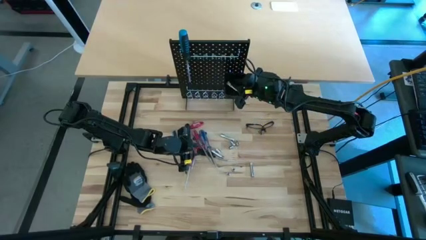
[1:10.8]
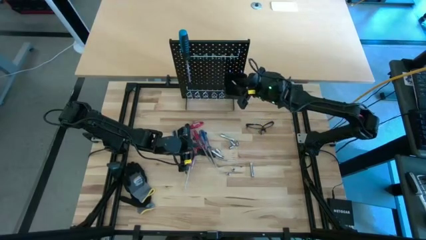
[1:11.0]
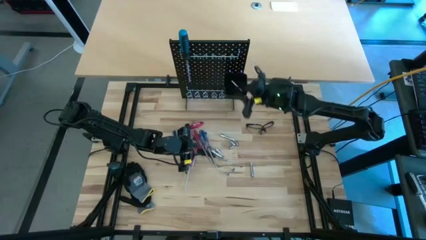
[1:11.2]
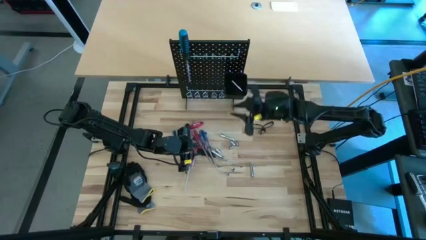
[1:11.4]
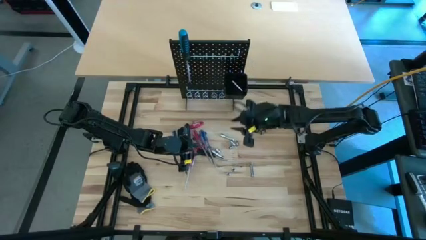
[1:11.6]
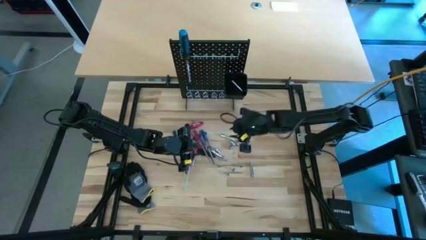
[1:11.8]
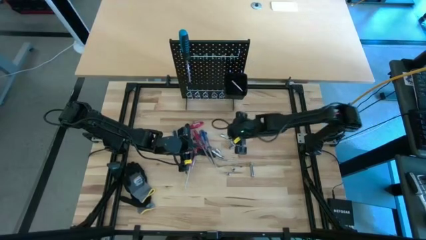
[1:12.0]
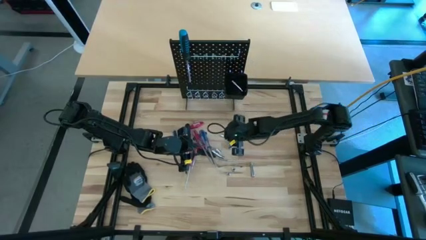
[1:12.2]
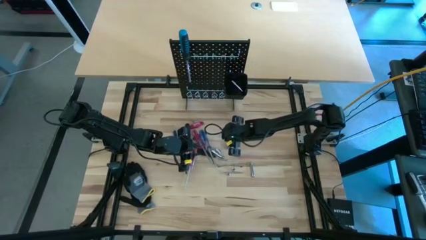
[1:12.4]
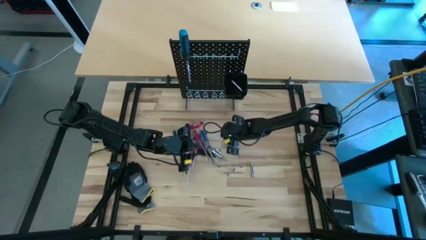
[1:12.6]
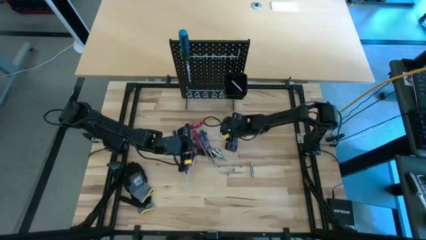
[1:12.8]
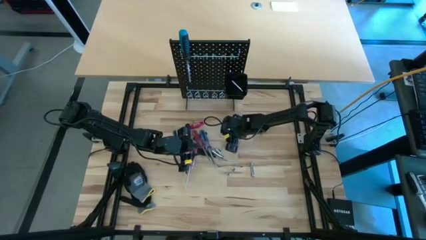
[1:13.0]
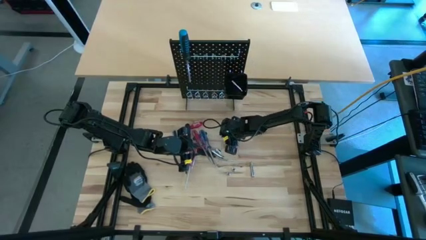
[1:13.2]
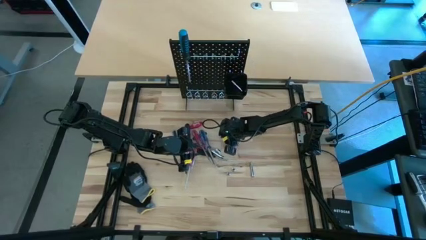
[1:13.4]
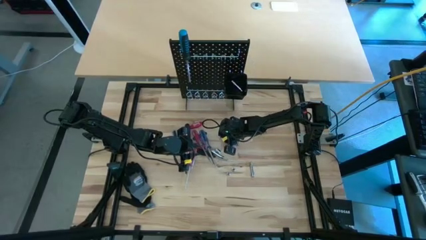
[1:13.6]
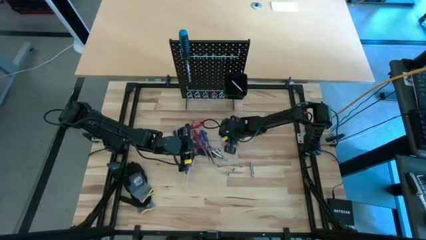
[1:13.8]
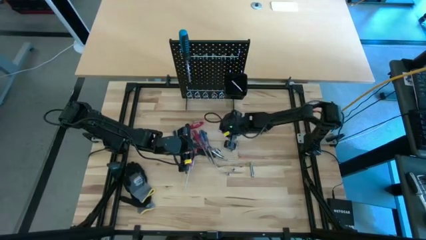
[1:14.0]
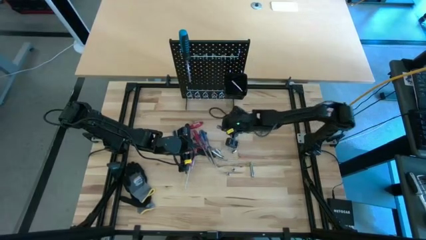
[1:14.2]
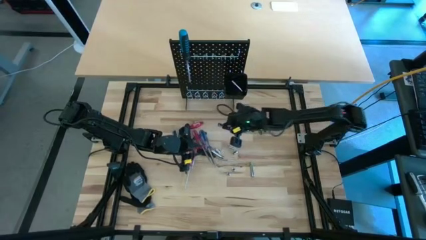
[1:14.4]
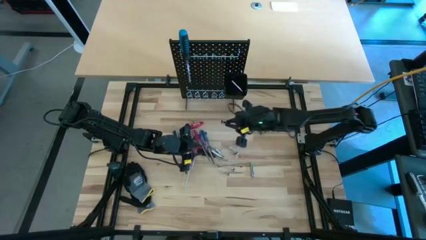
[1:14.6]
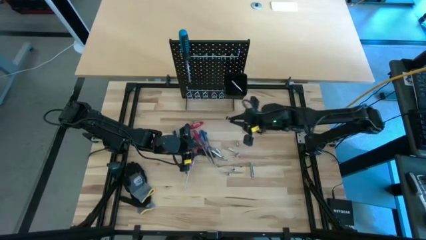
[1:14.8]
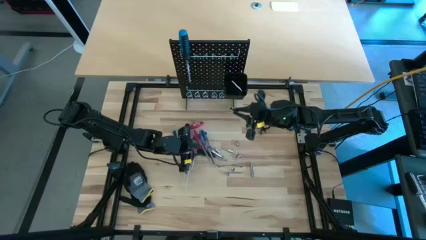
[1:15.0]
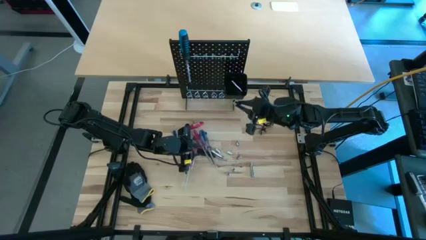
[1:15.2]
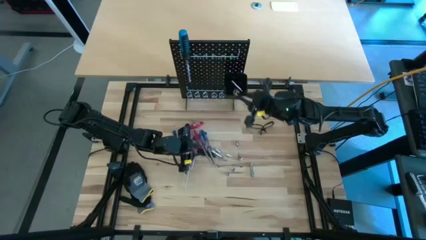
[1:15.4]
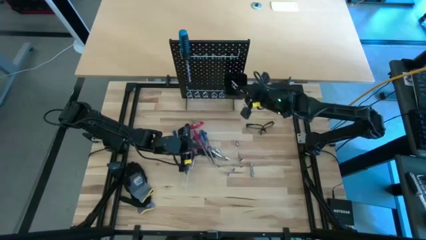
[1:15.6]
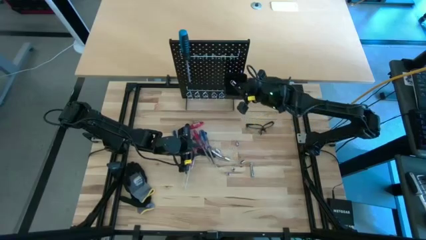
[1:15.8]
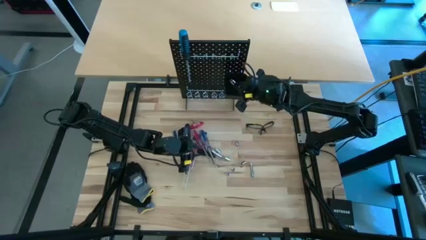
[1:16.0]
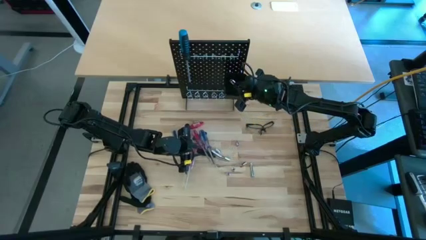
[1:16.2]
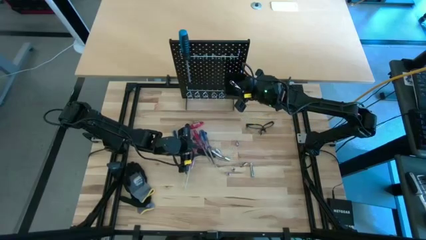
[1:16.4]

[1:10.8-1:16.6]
Task: Hang tools onto peg board
Put the silver extension bar into the black bin on the peg board

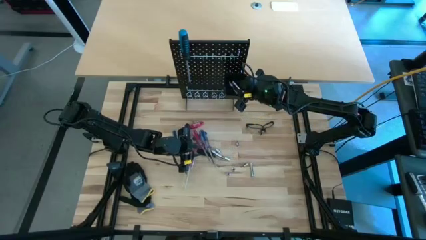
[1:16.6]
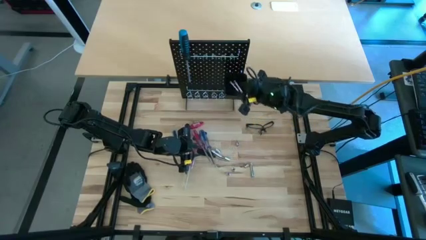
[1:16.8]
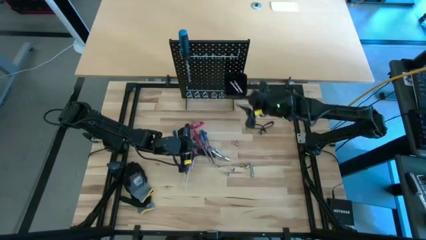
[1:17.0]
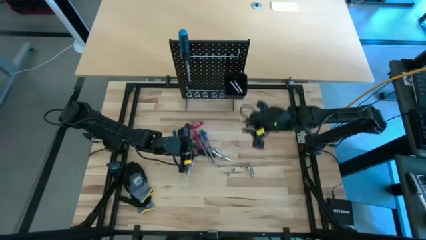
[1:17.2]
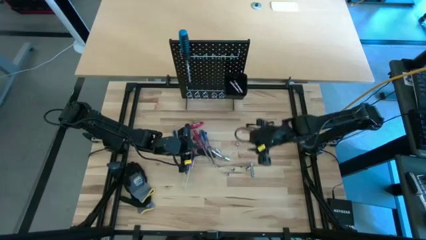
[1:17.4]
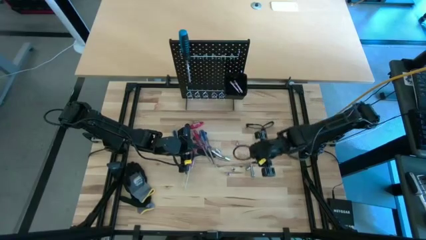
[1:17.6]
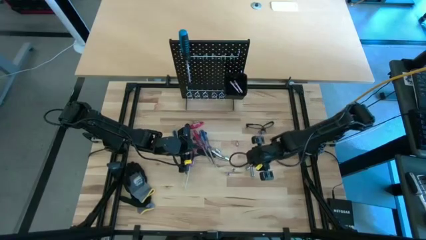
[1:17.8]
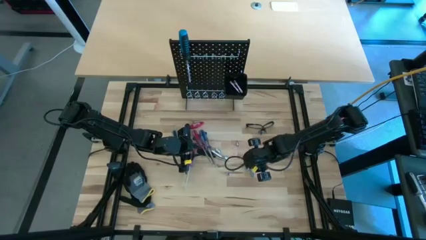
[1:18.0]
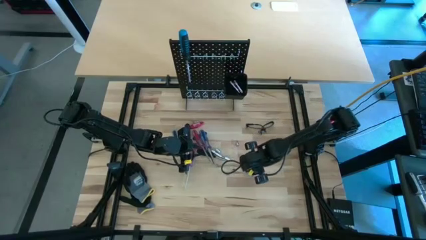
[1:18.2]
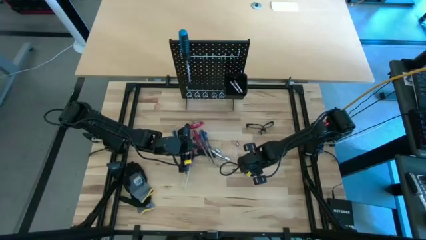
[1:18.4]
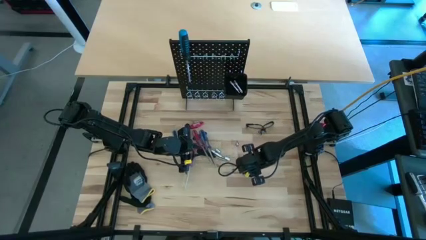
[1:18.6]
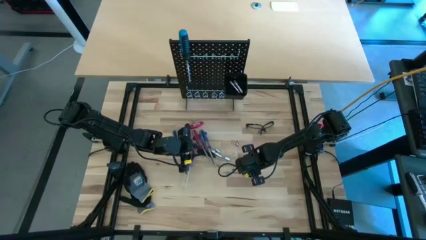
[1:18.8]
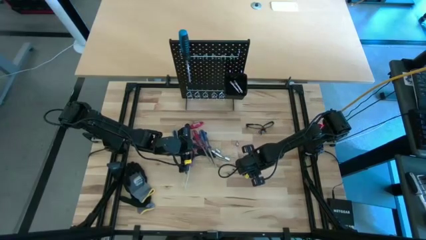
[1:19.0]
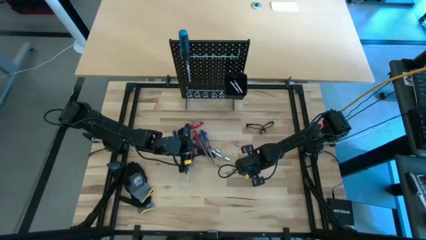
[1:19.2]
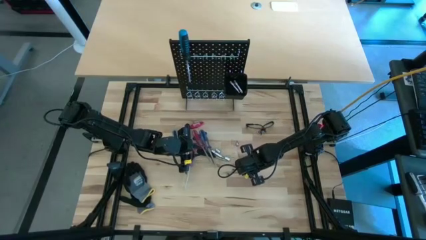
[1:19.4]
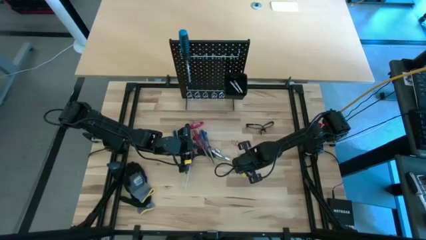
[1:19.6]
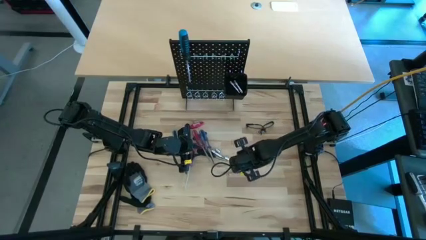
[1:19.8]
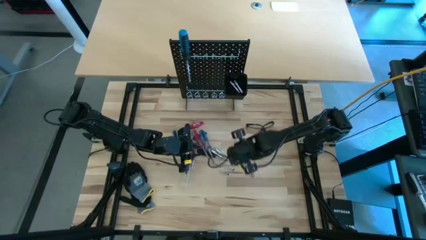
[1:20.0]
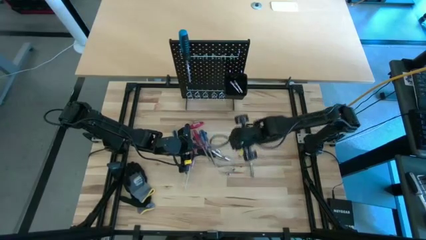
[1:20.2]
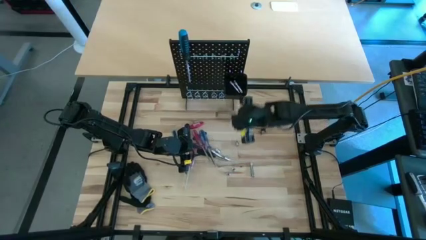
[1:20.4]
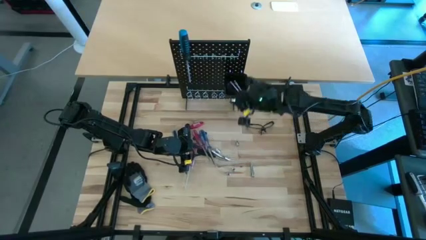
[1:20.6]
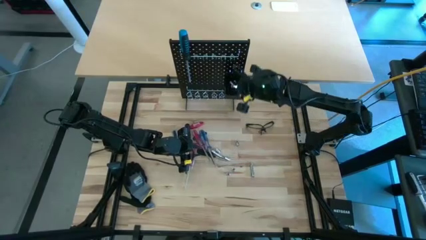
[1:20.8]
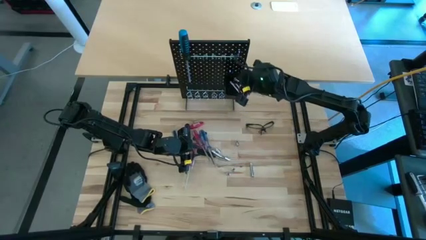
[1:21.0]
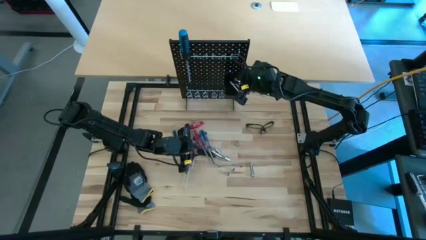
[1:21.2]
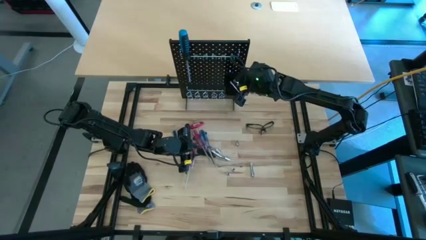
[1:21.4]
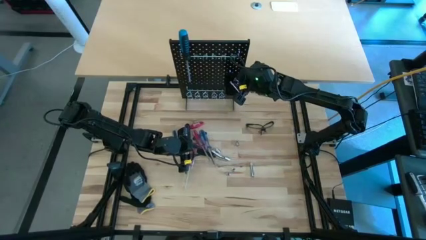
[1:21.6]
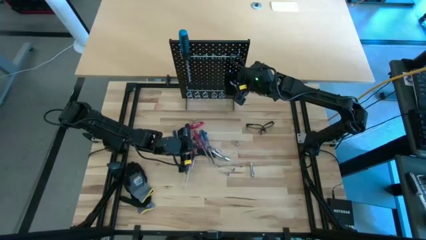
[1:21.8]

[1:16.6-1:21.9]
Put the silver socket into the black bin on the peg board

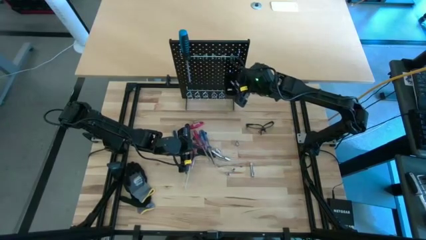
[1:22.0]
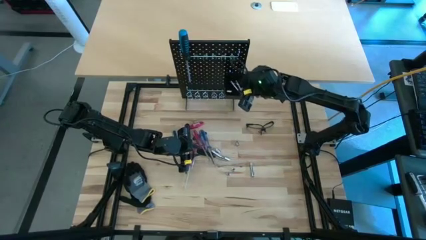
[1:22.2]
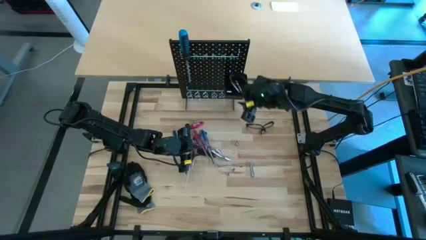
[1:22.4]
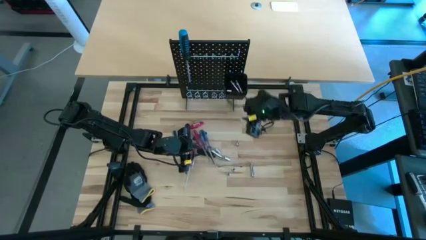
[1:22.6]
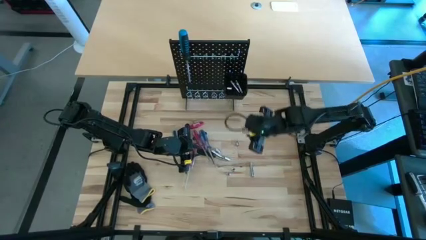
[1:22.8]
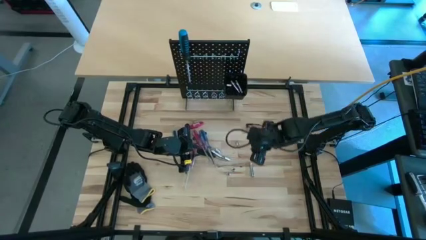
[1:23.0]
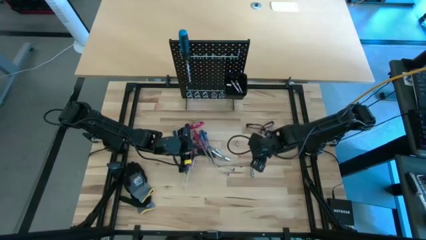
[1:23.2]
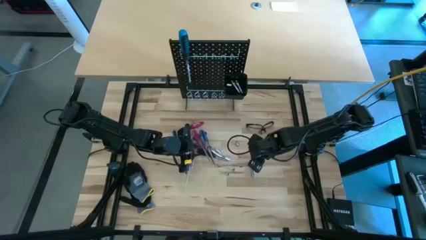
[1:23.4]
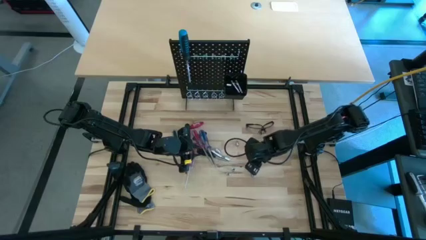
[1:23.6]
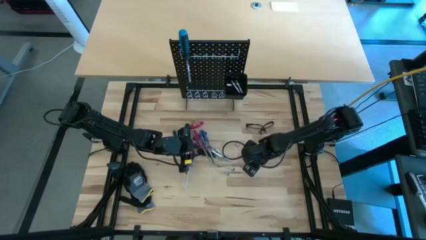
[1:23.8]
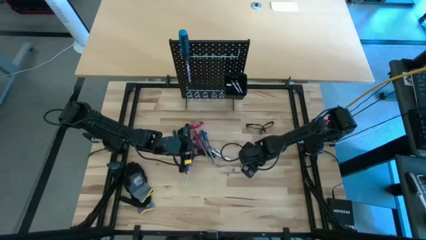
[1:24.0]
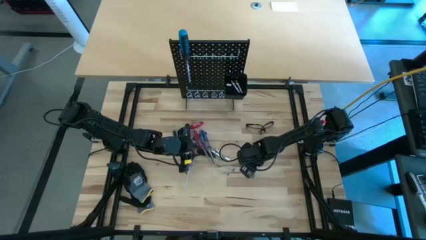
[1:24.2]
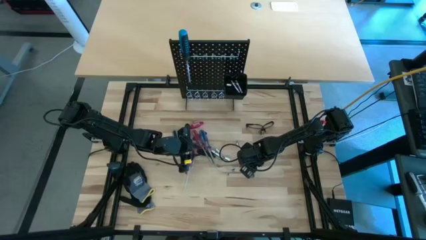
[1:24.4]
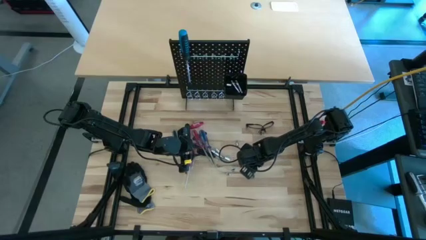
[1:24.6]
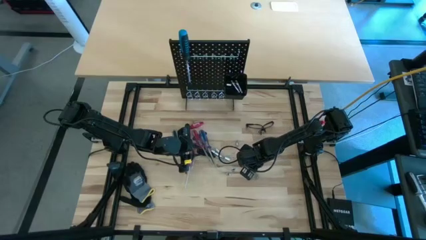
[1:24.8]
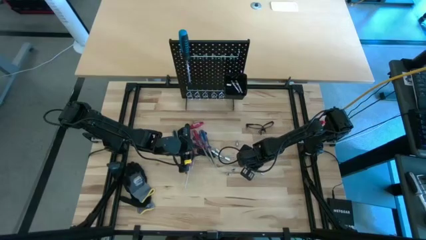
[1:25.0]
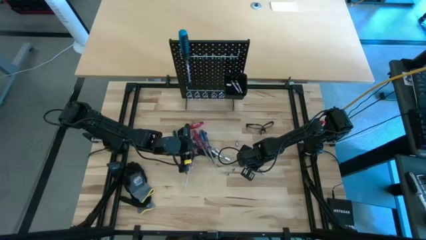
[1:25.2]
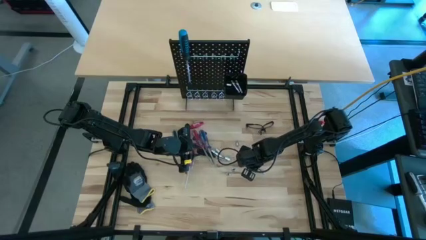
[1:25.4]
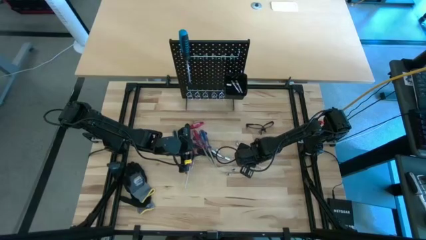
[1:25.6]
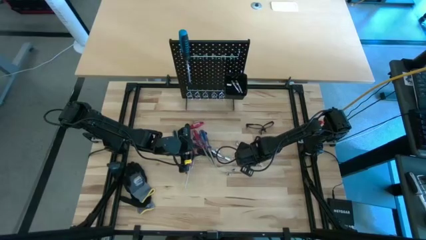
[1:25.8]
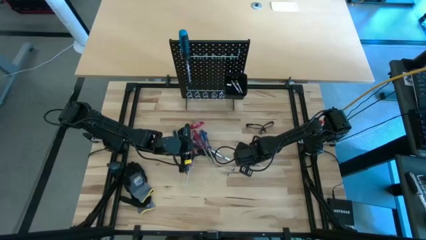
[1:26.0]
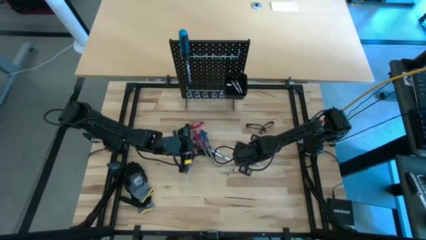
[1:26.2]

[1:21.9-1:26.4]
Put the silver extension bar into the black bin on the peg board

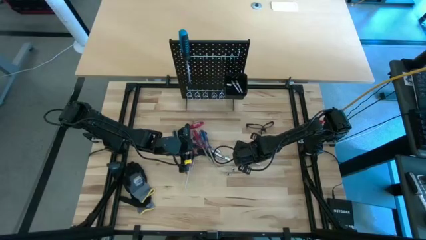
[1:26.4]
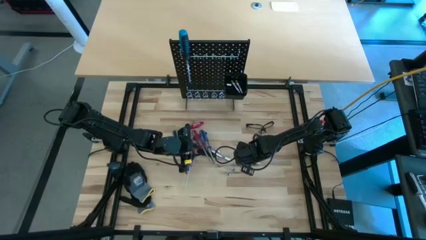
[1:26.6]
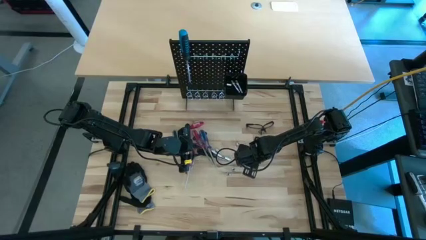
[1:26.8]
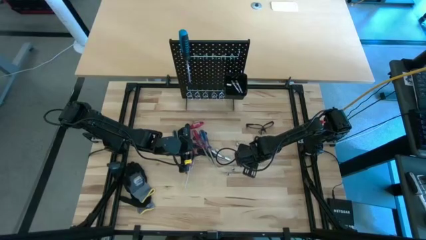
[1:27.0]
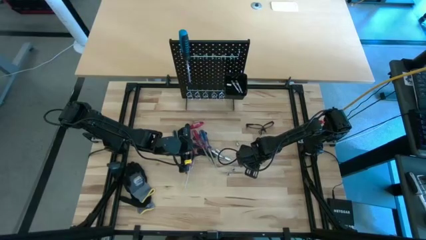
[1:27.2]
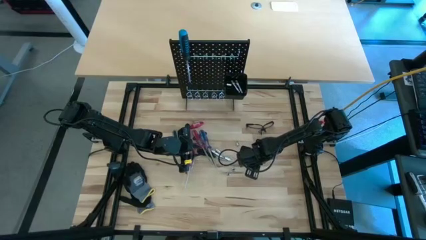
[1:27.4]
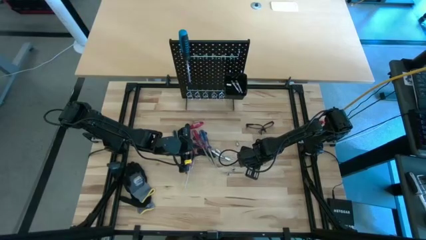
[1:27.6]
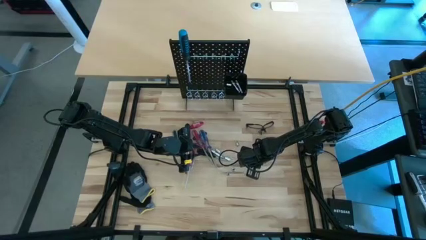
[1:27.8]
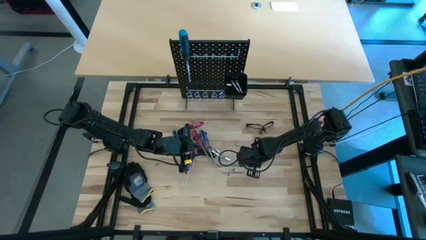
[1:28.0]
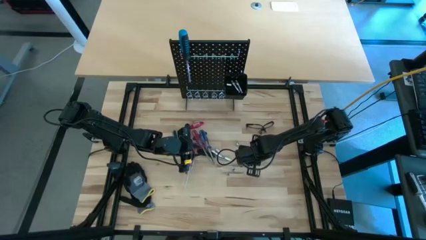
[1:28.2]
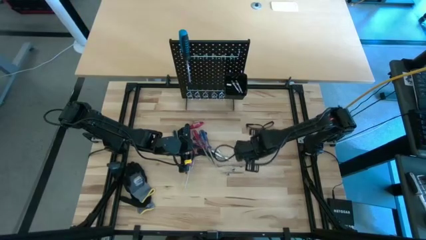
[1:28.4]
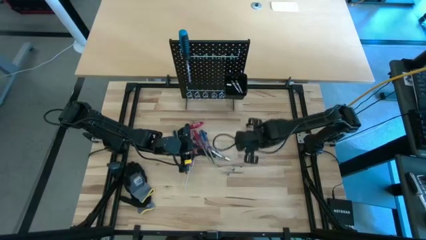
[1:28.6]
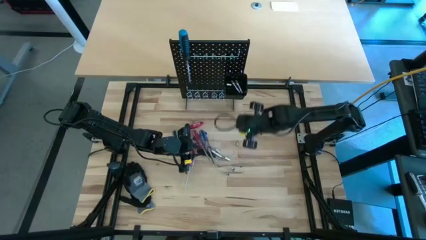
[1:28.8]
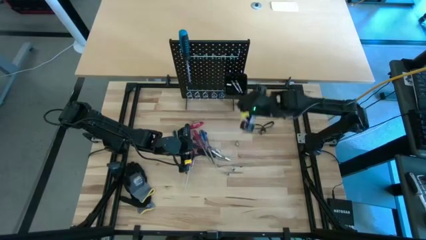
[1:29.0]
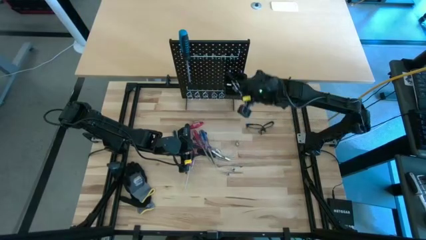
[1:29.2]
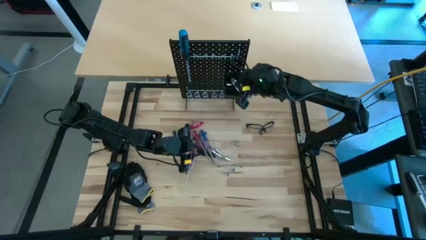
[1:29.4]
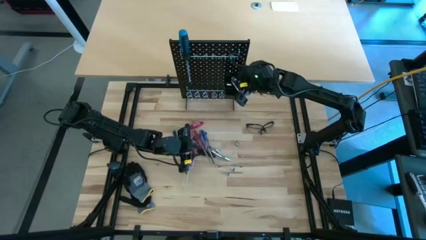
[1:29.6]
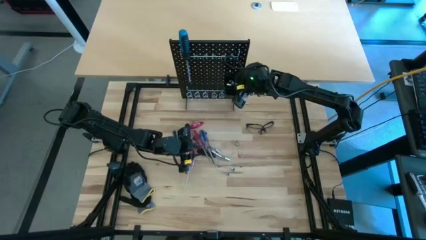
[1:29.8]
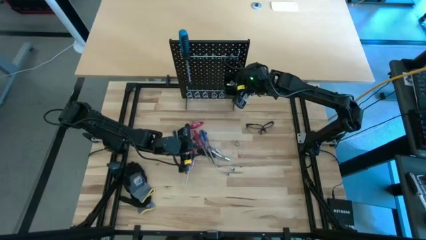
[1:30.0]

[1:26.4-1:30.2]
Put the silver extension bar into the black bin on the peg board
